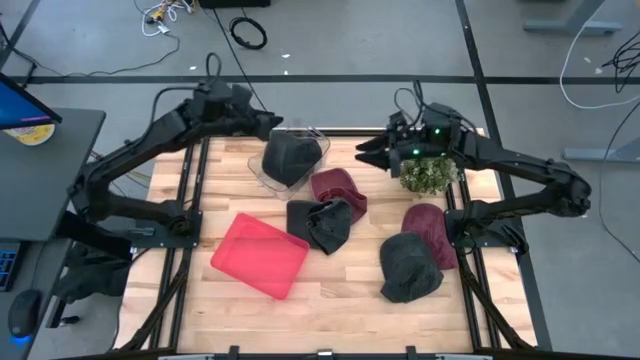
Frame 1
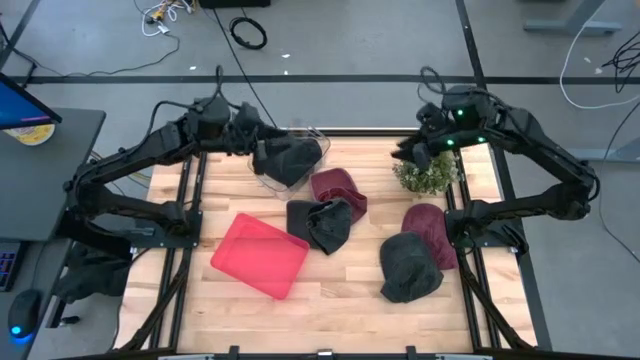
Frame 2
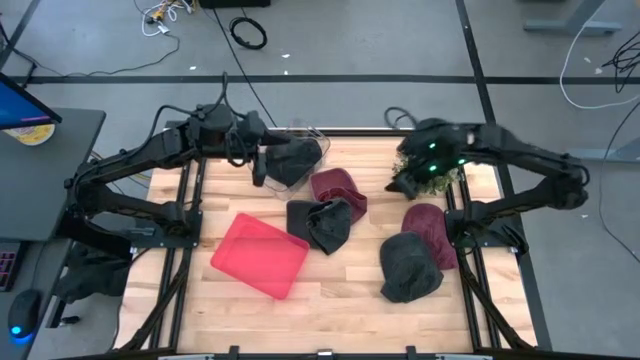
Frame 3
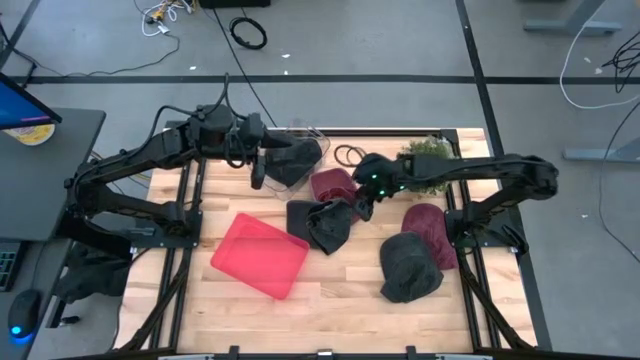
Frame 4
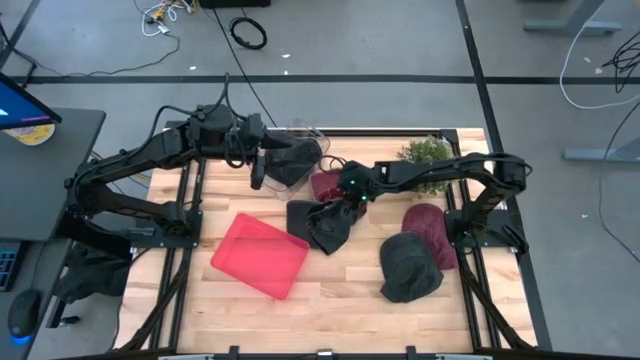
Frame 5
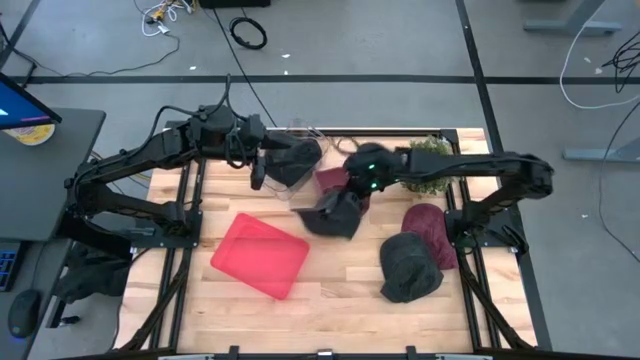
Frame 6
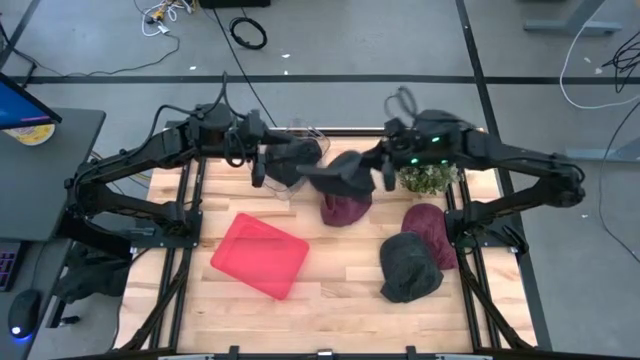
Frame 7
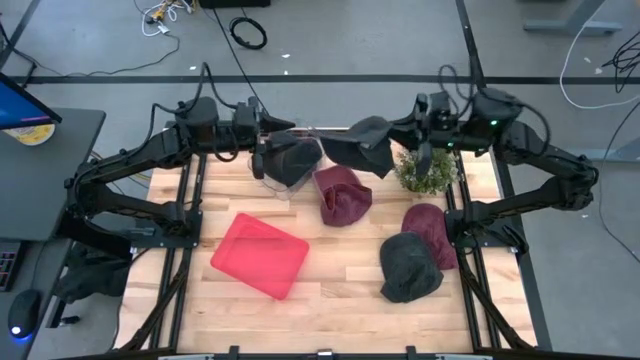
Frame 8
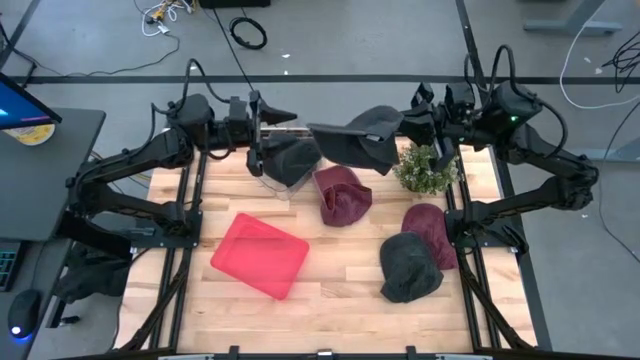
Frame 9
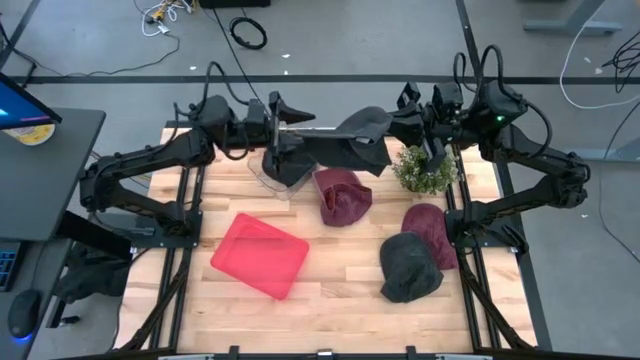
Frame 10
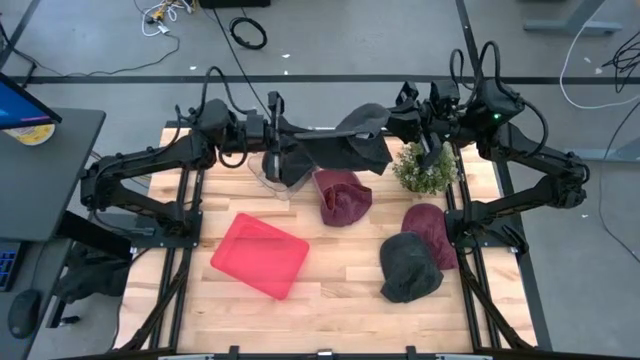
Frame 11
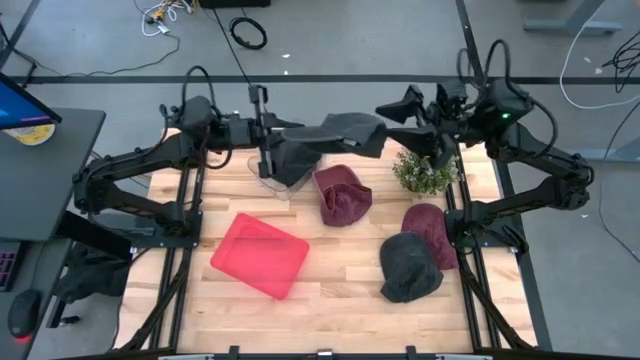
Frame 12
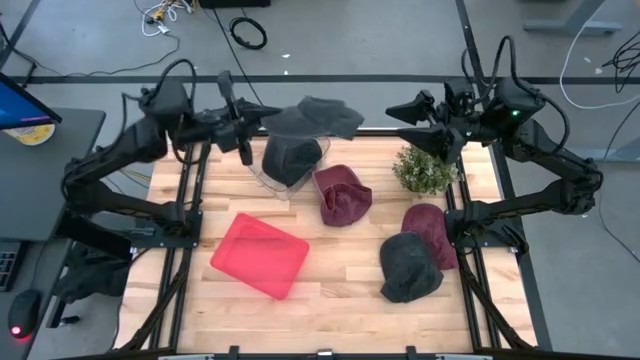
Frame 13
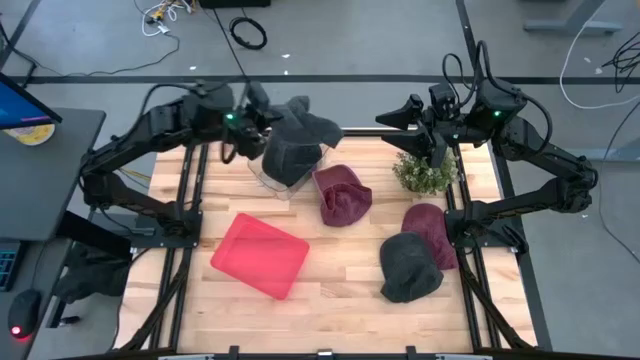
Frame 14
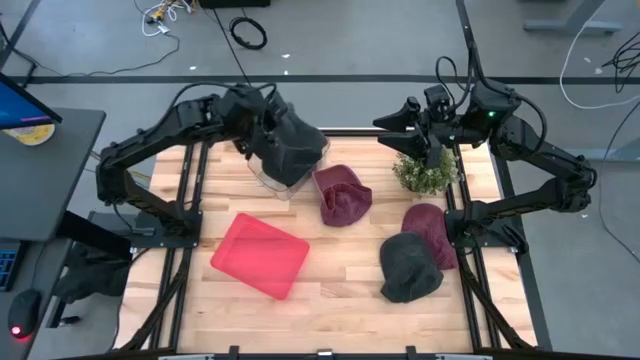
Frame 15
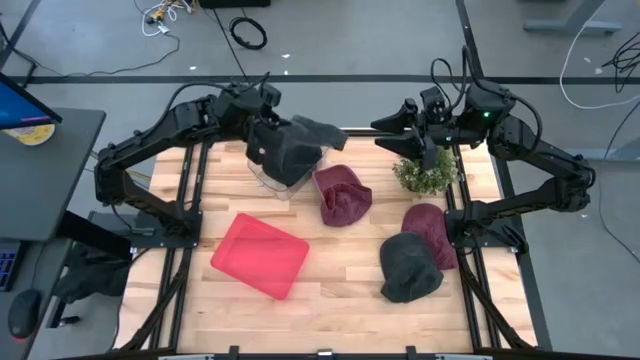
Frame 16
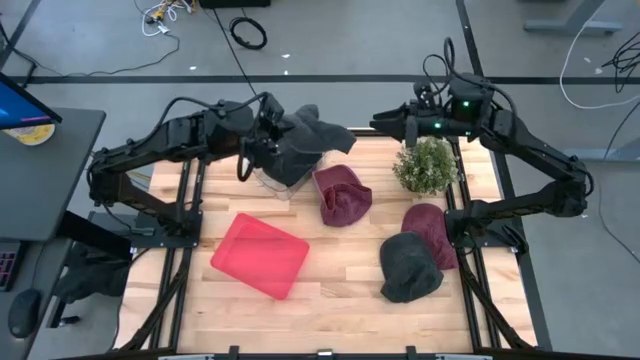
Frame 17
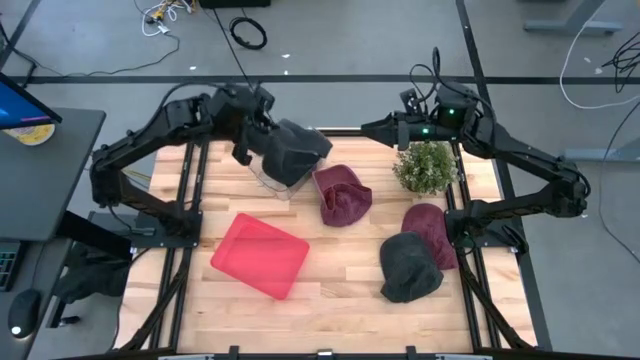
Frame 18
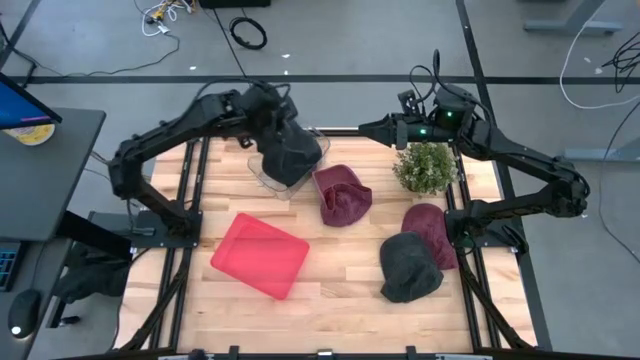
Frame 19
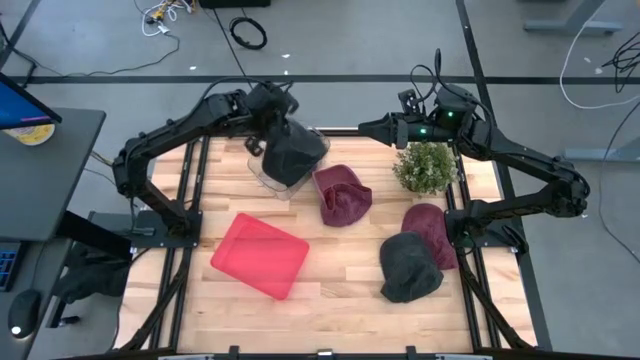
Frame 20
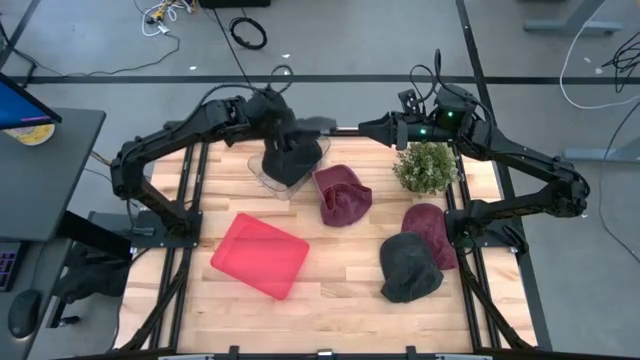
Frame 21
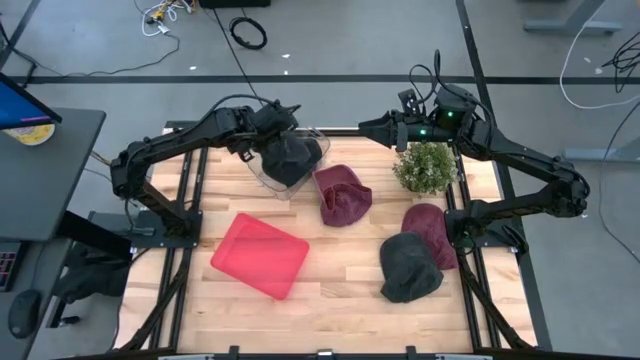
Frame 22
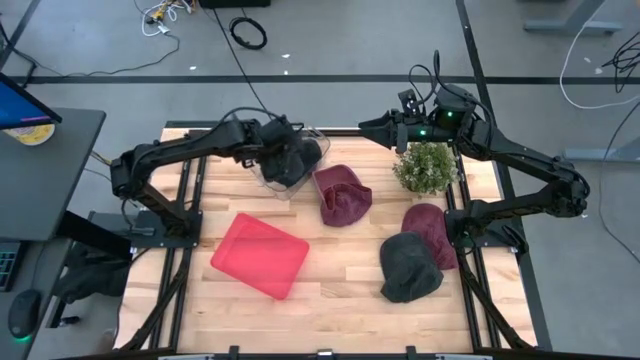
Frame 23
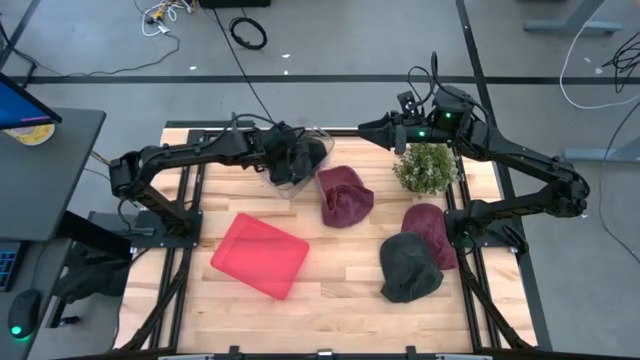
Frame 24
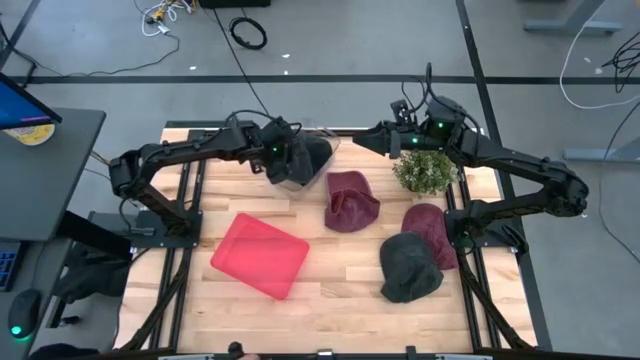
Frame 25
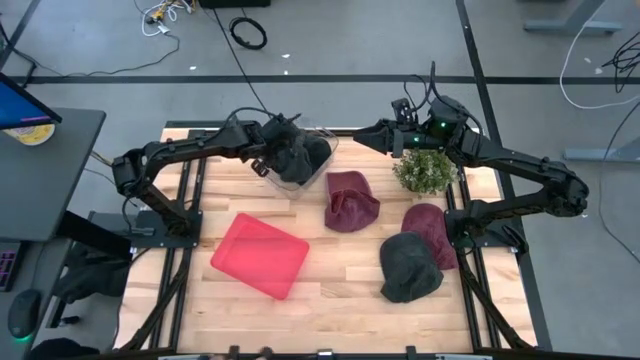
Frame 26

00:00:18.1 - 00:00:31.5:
Task: Pick & Place hat
Put the left black cap into the transparent bin

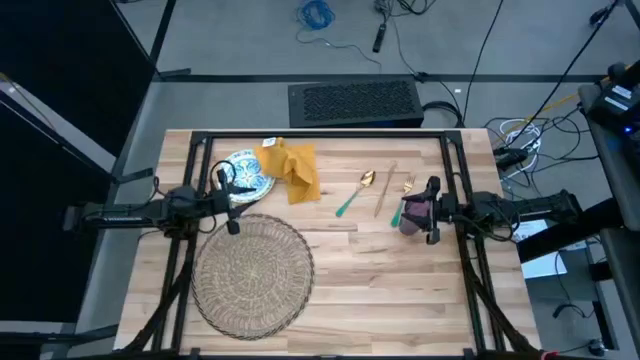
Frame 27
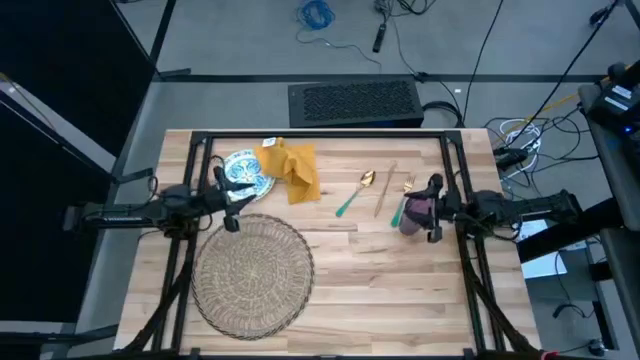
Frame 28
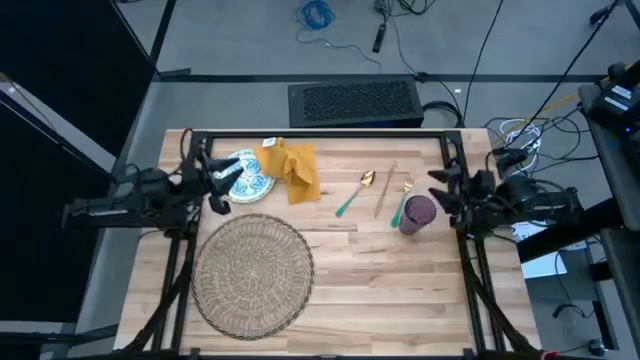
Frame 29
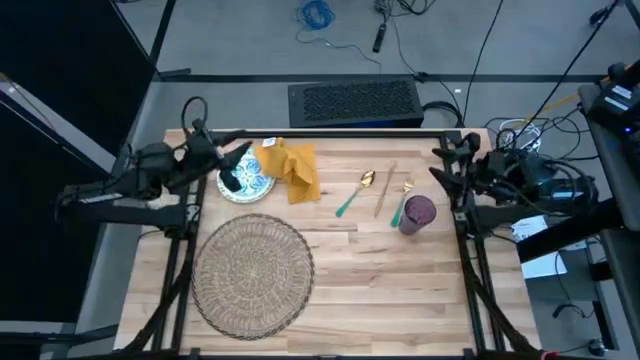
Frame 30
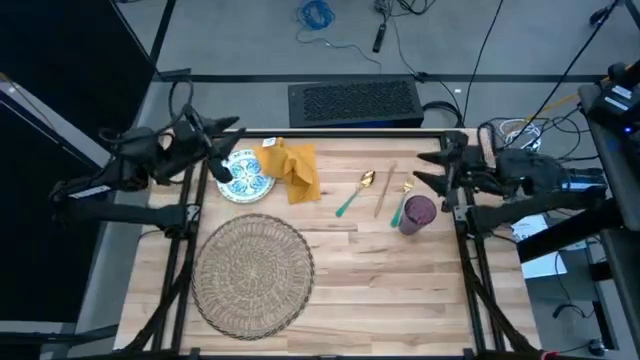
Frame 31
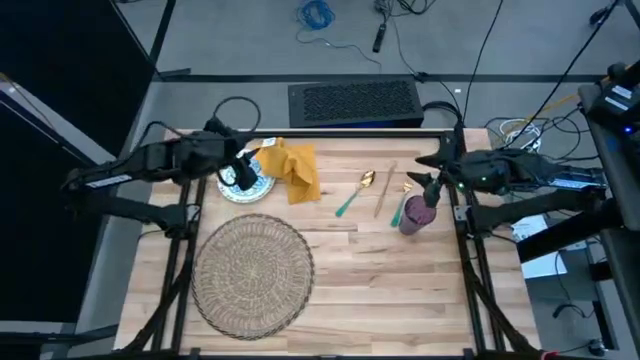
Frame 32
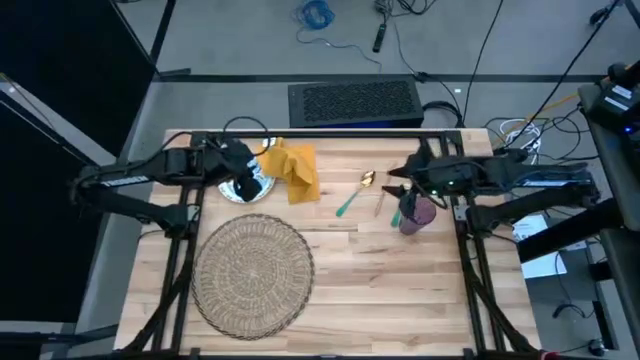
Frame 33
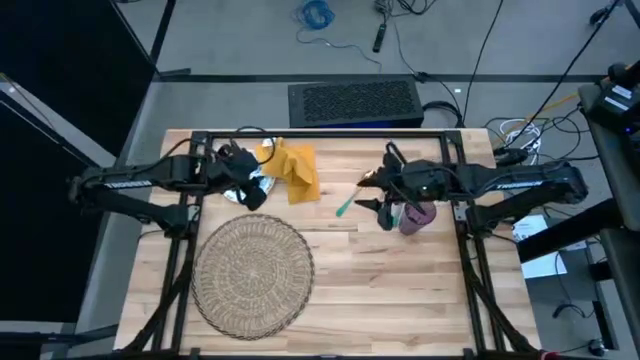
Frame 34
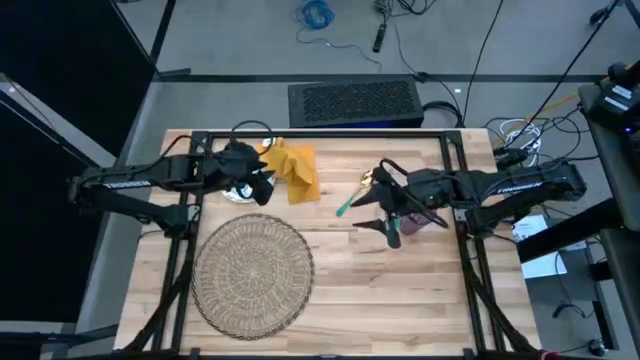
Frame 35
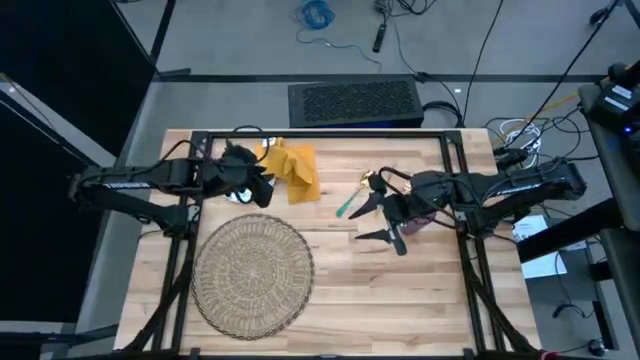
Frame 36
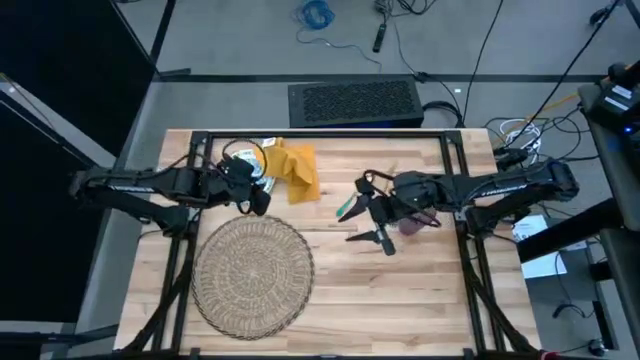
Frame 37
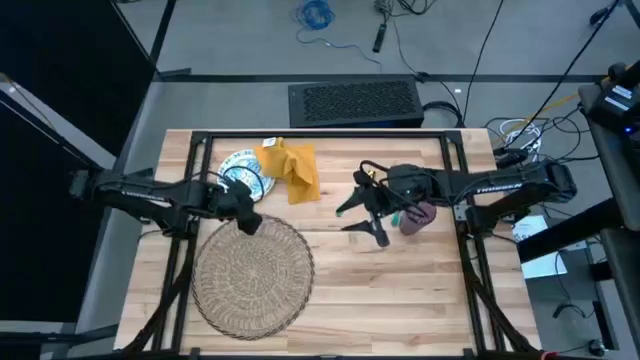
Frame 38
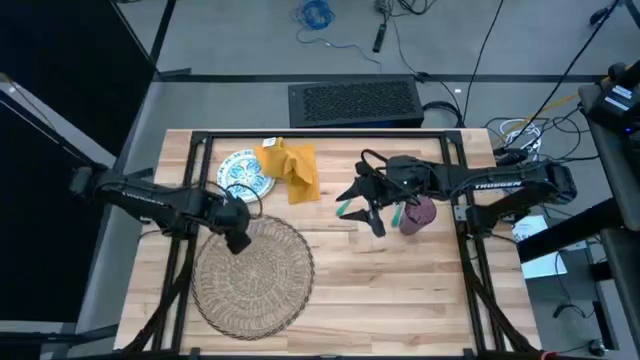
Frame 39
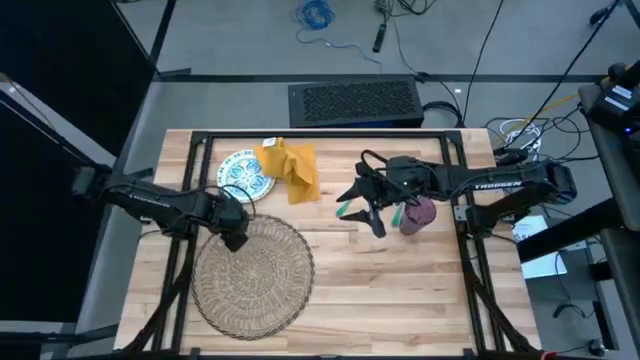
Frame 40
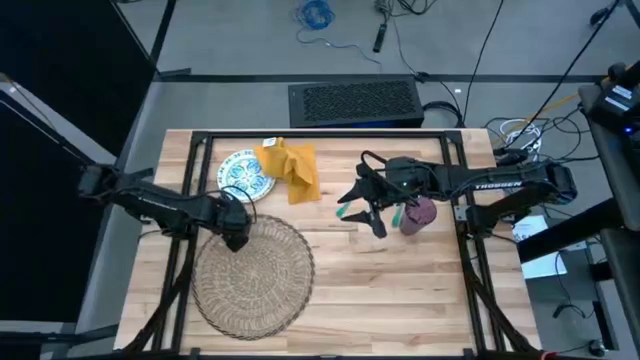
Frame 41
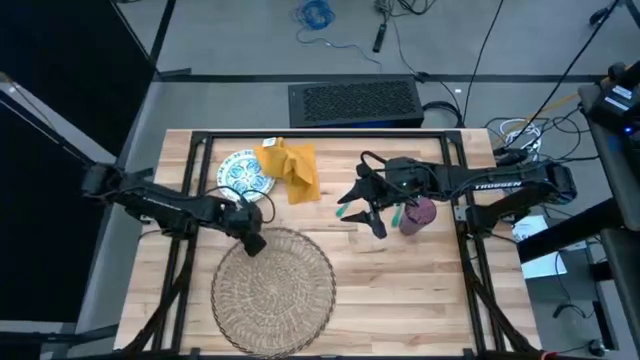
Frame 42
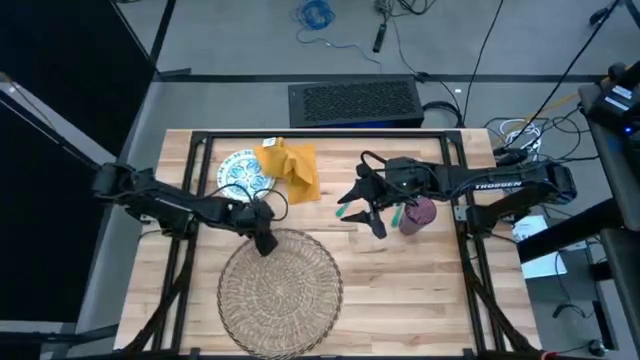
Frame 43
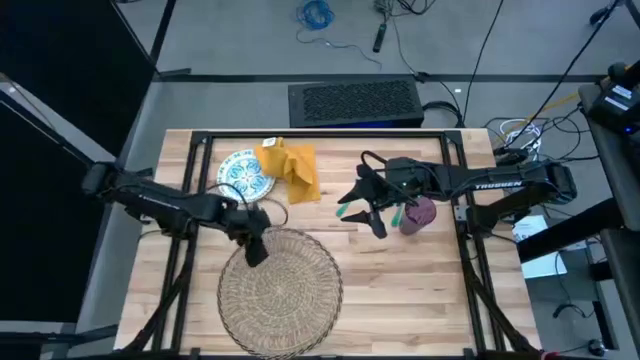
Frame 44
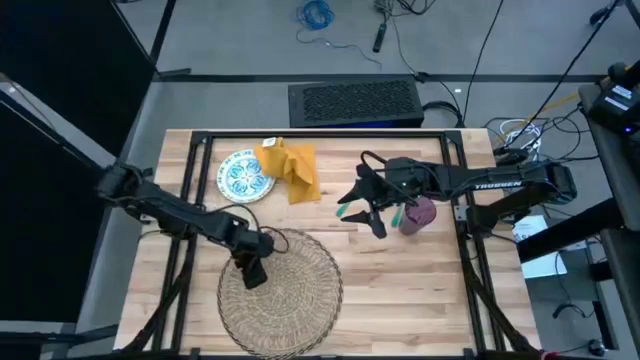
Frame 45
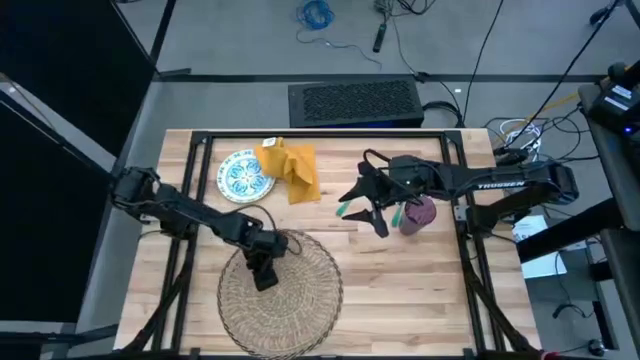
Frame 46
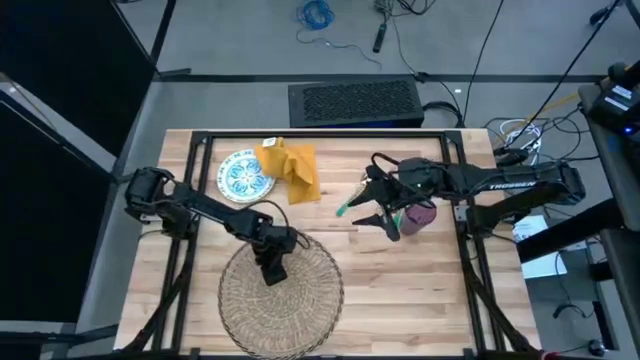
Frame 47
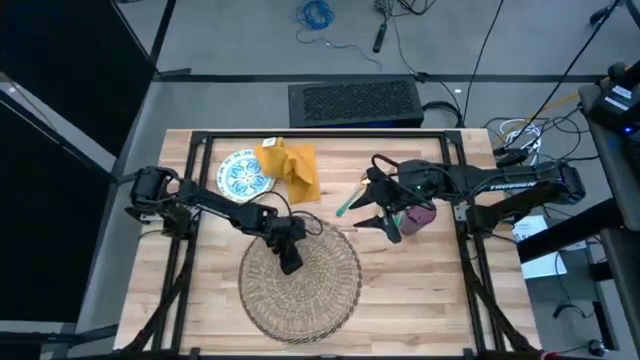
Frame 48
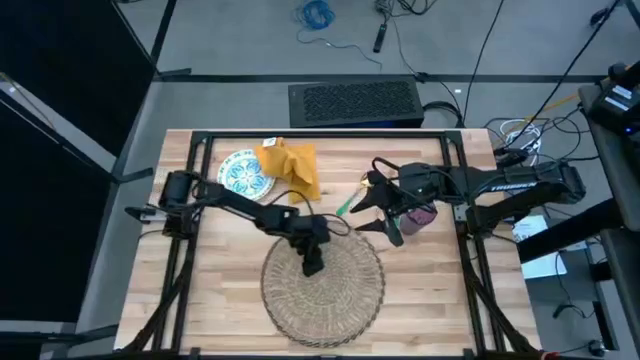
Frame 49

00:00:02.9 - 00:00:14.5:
Task: Set table place
Move the brown table mat to the center of the table
